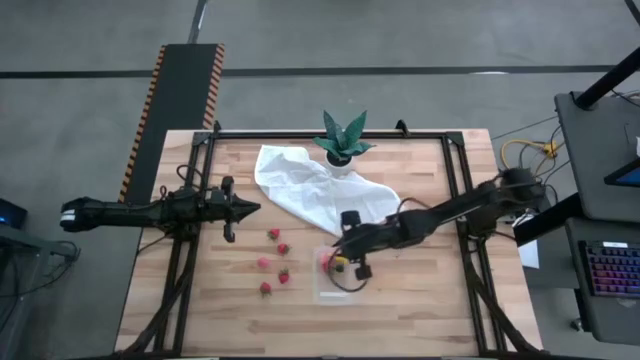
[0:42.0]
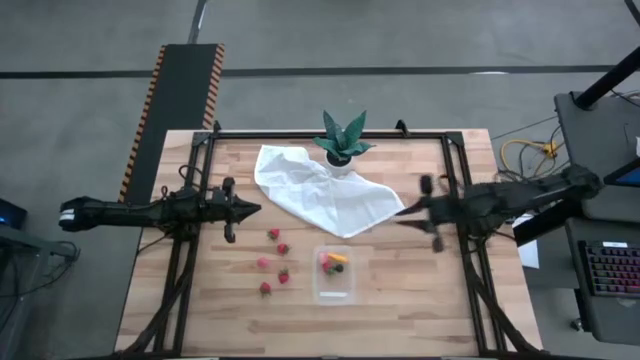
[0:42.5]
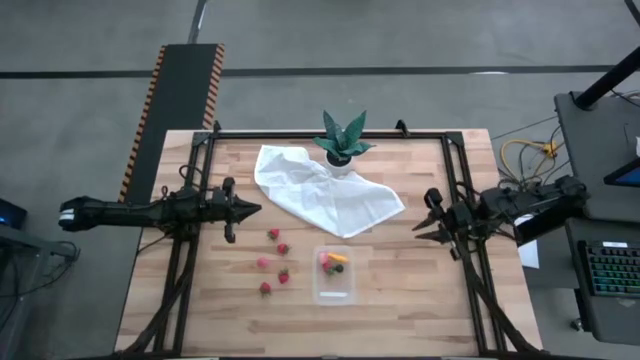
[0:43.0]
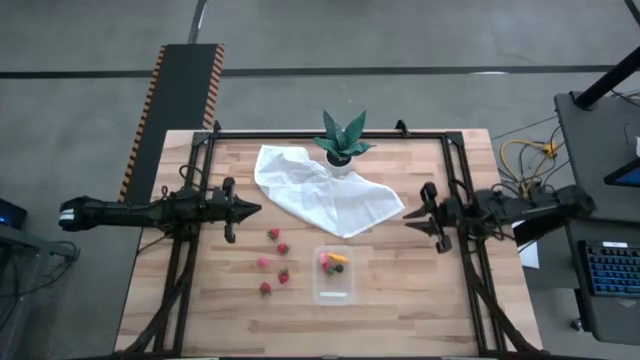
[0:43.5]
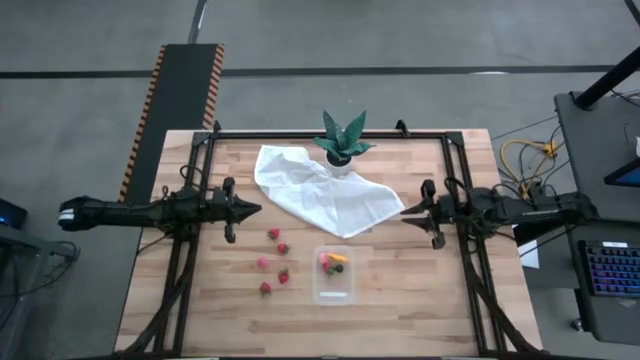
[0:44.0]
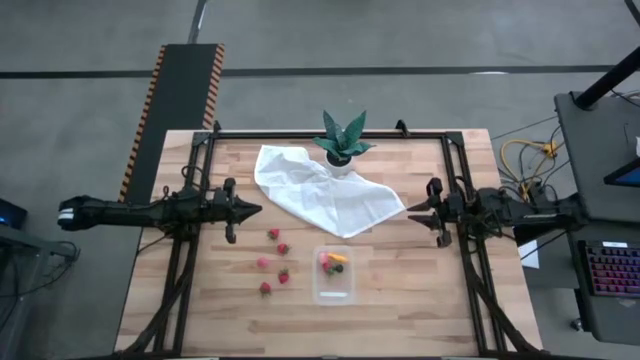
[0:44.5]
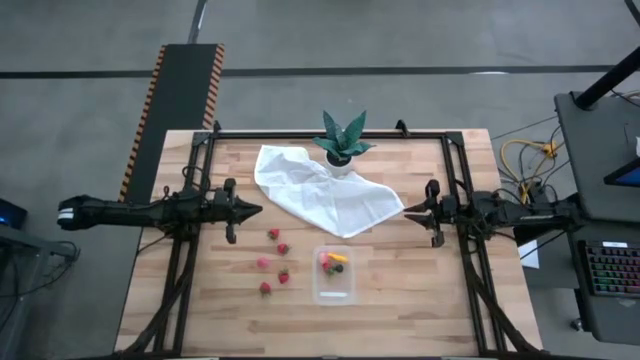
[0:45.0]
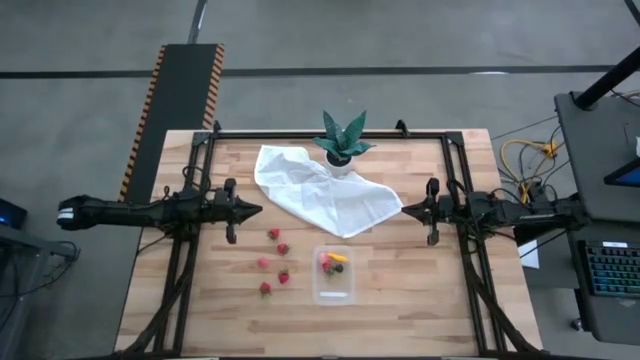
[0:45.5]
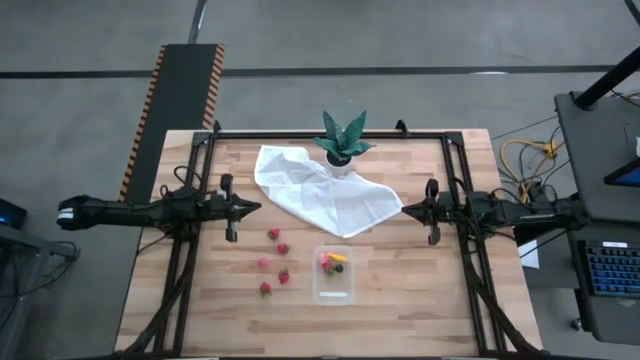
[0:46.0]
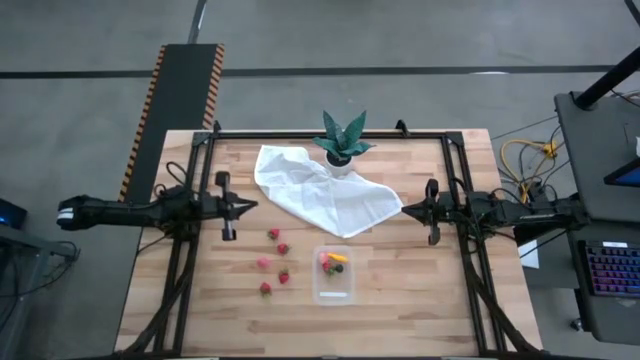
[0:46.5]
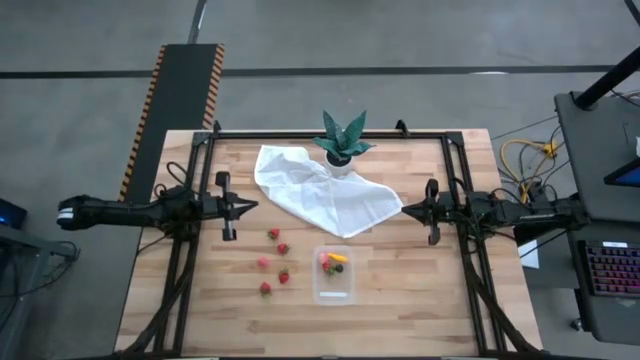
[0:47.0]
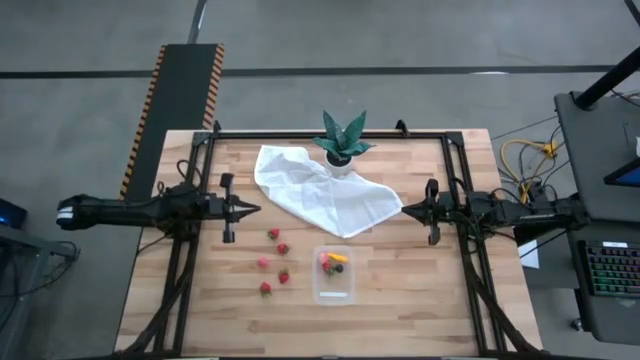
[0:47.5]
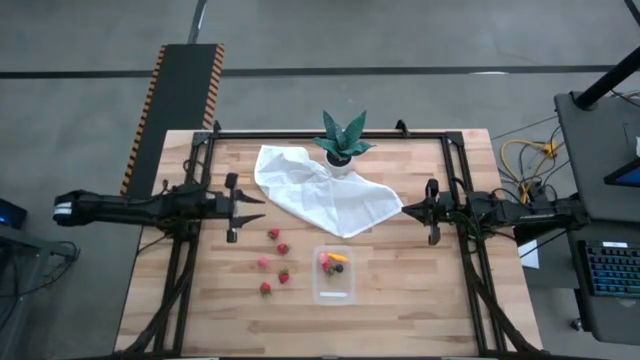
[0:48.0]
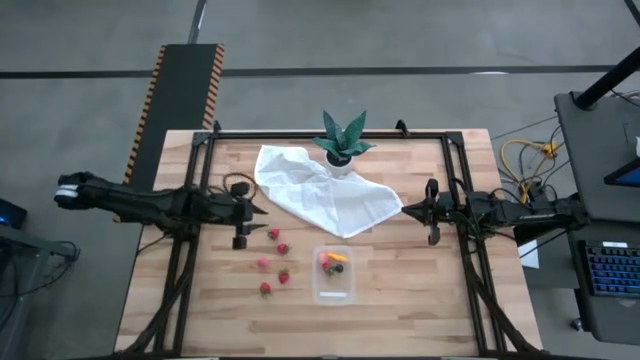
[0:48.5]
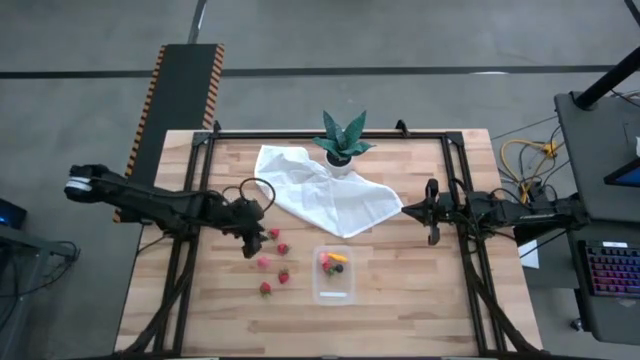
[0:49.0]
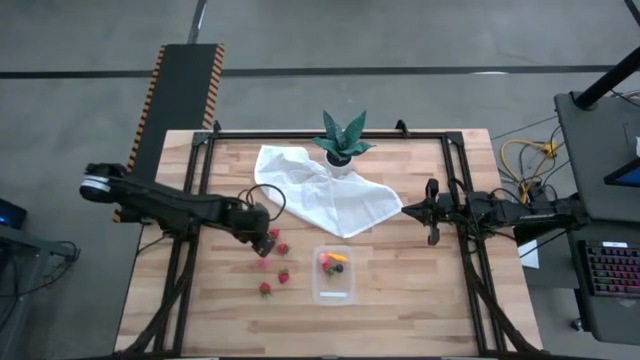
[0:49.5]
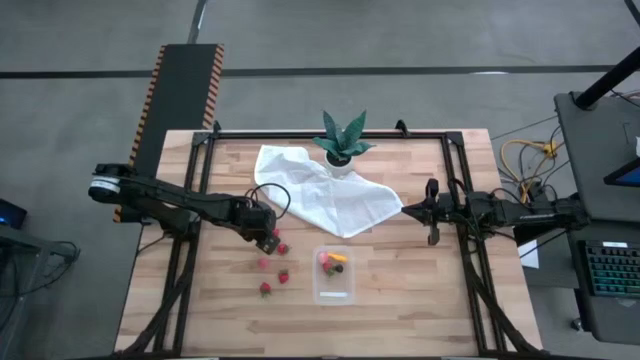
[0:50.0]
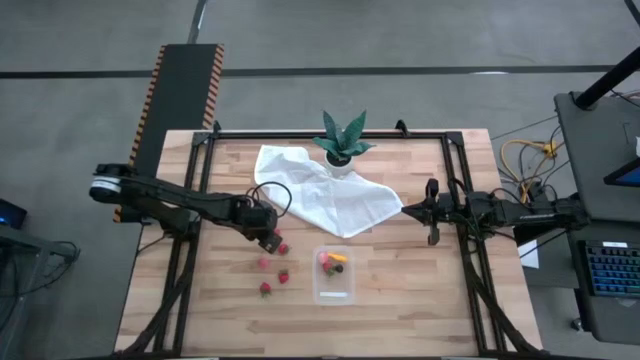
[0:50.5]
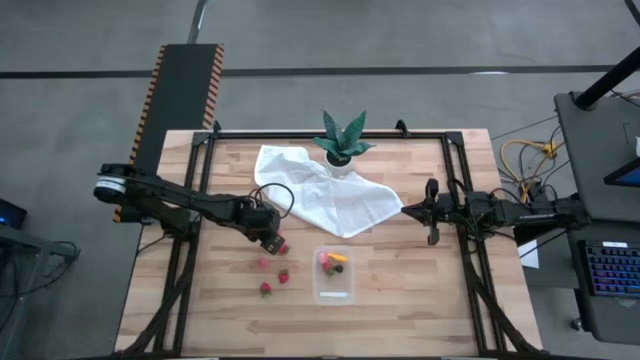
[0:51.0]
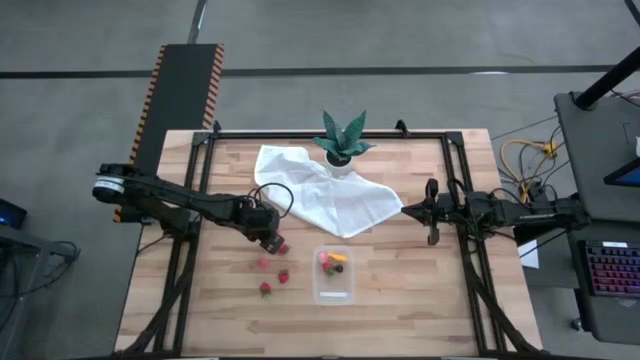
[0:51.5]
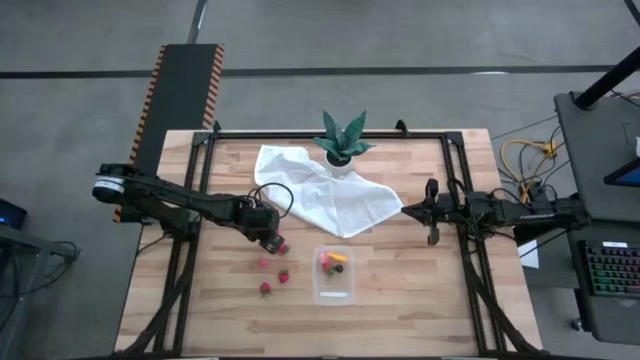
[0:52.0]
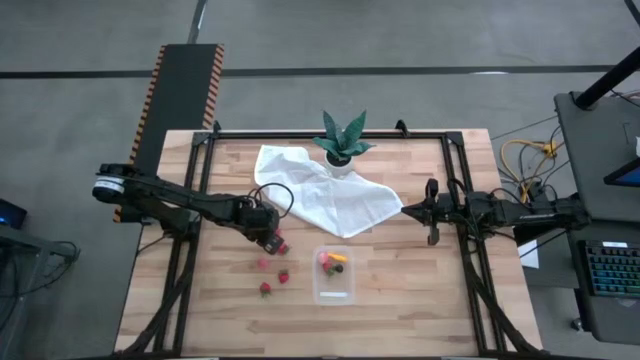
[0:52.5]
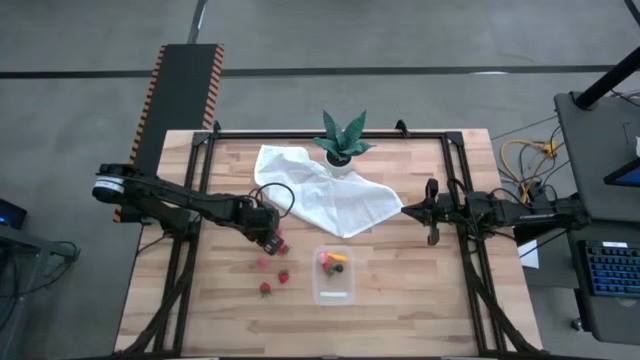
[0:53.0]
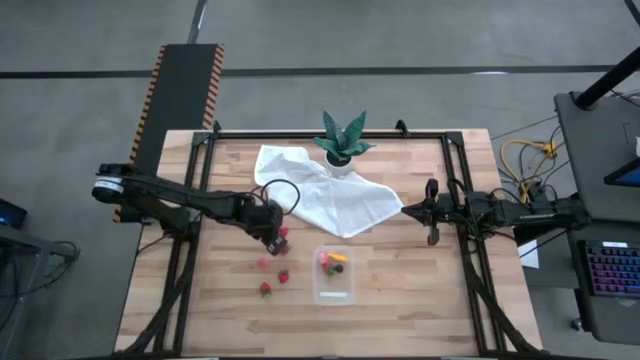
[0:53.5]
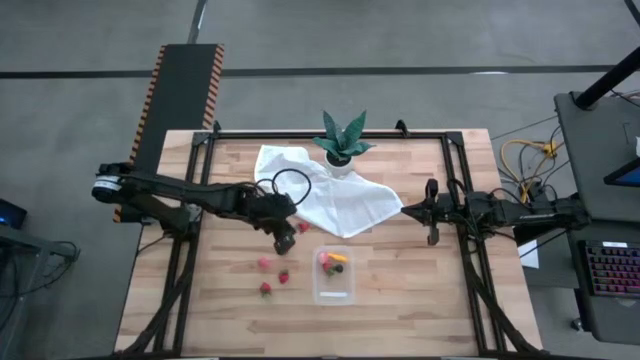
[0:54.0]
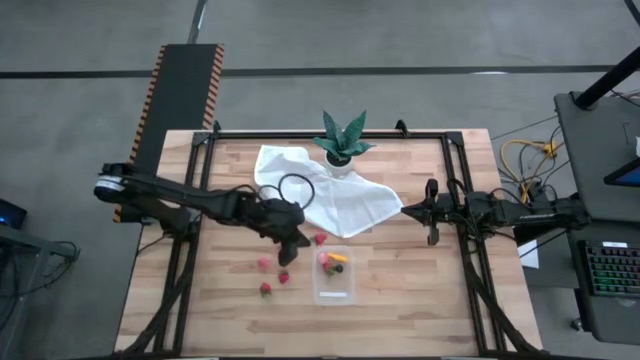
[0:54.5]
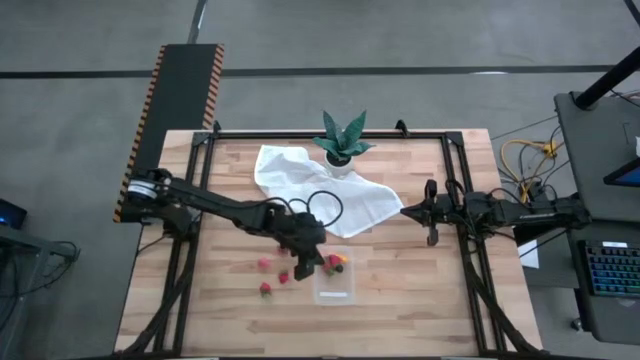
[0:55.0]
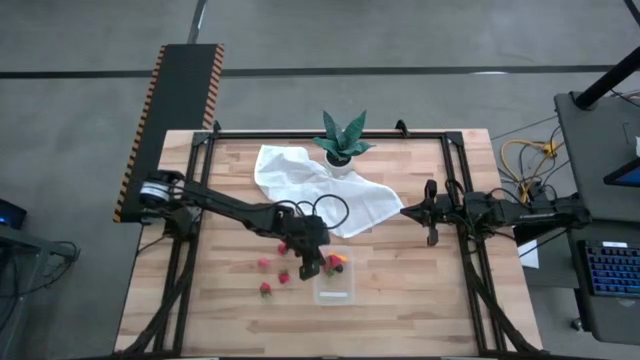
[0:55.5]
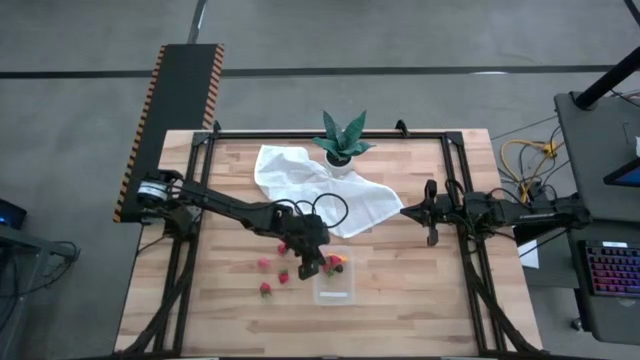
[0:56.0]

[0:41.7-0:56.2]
Task: Pick and placing Produce into tupperware
Put the red strawberry into the transparent bin

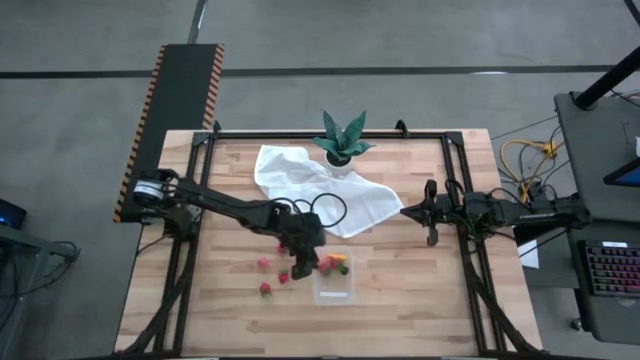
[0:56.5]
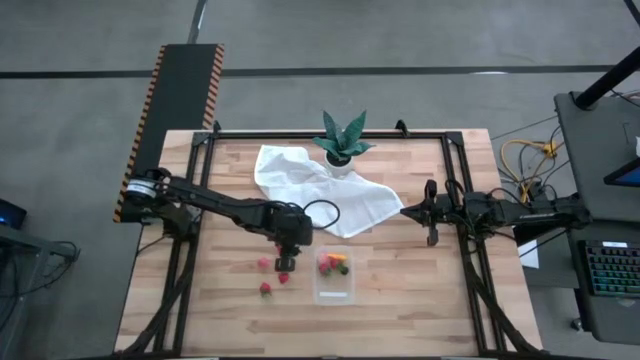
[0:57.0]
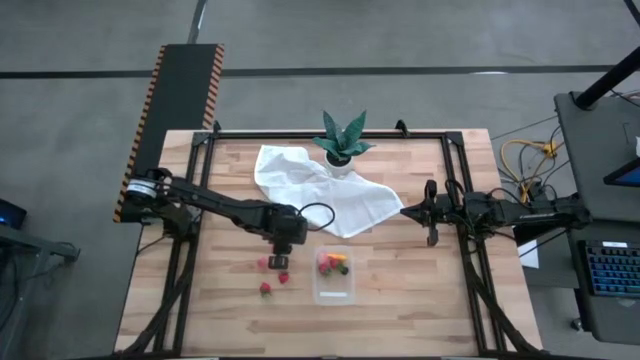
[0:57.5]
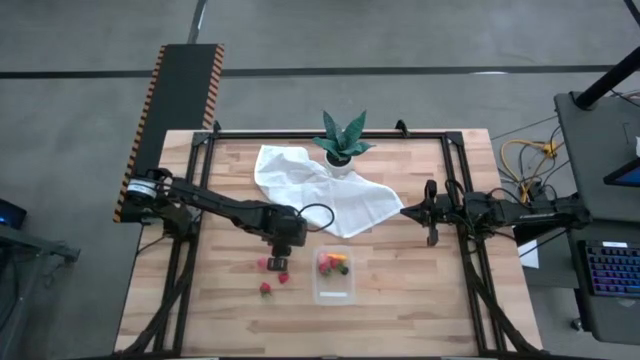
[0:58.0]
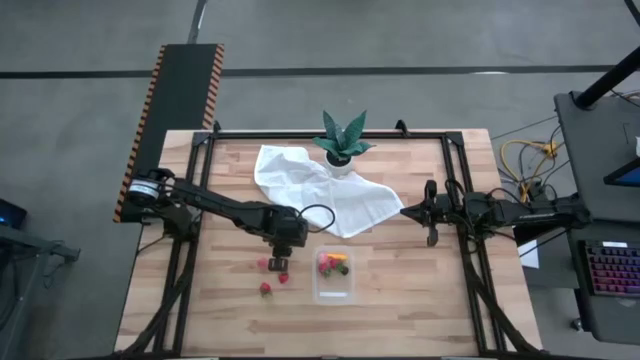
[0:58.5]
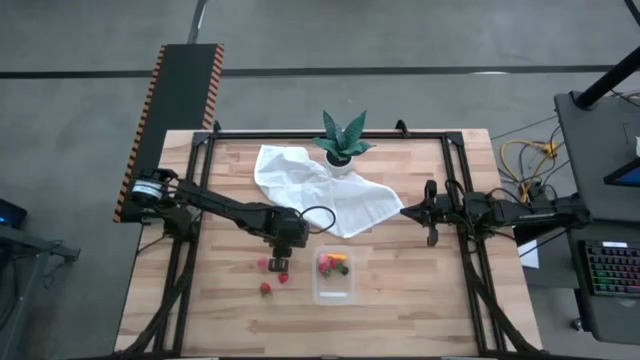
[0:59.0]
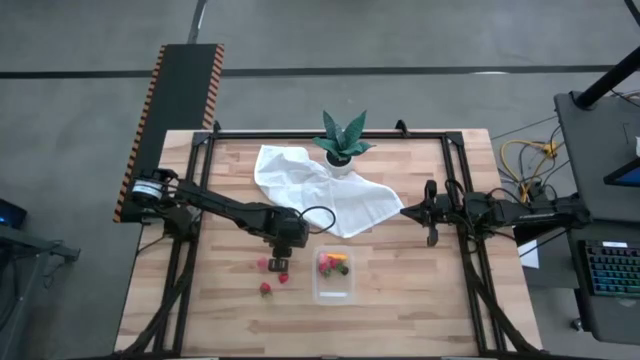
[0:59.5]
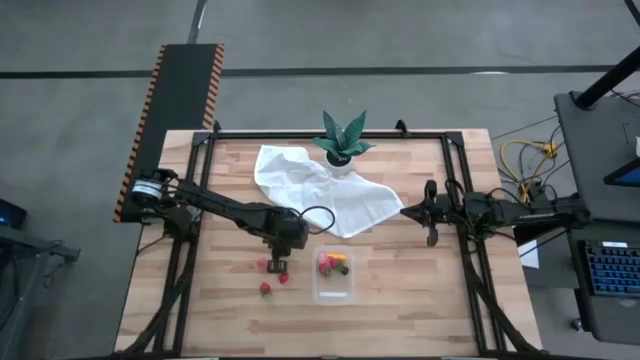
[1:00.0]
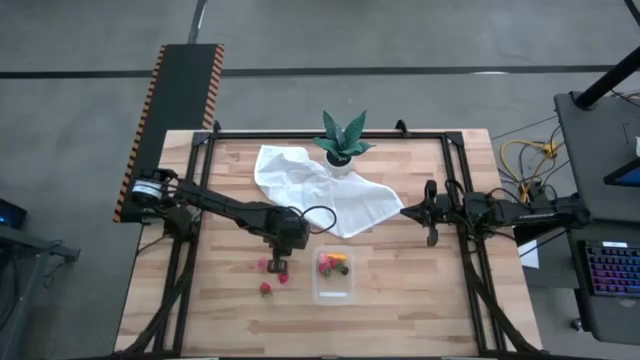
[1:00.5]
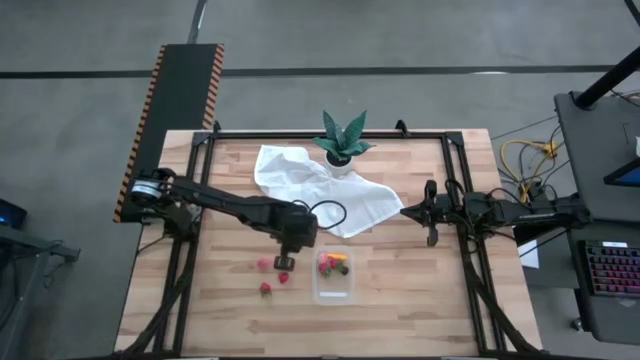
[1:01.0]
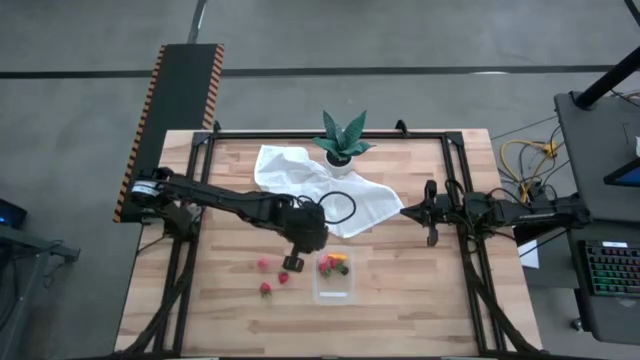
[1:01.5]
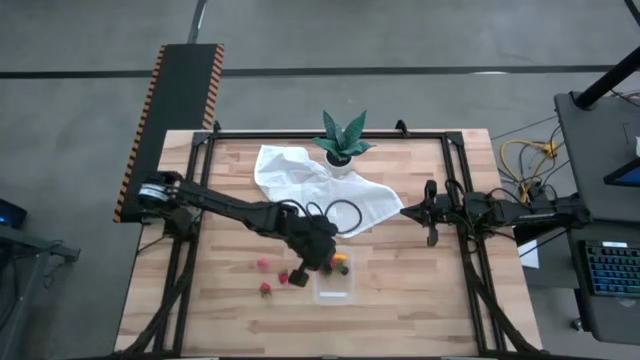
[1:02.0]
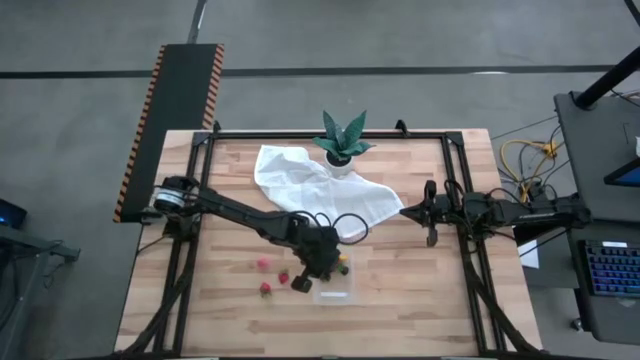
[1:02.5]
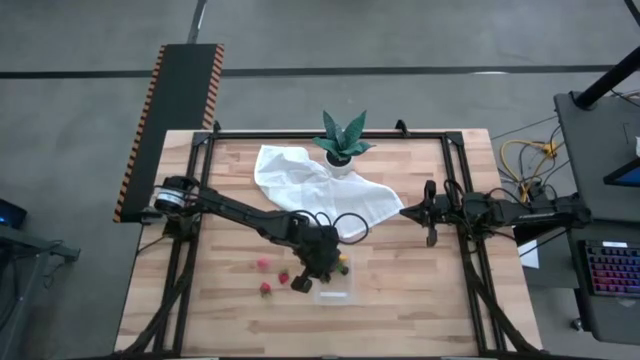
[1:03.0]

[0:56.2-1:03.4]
Put the red strawberry into the transparent bin
